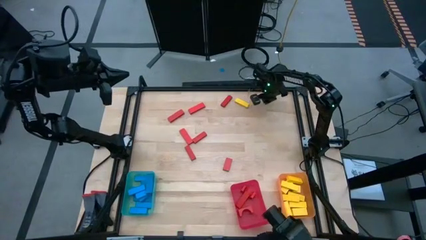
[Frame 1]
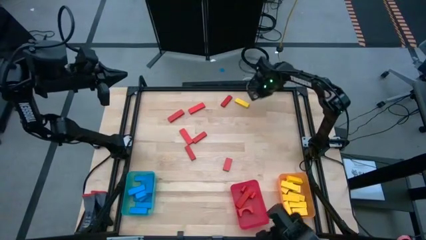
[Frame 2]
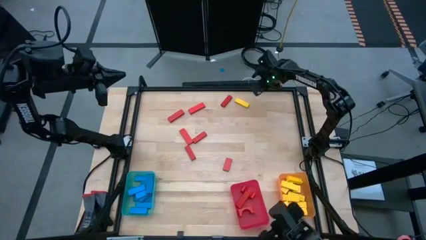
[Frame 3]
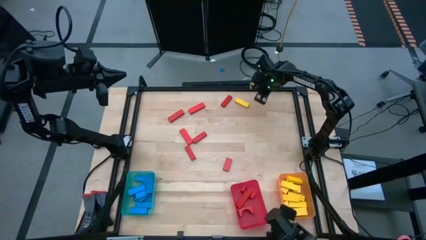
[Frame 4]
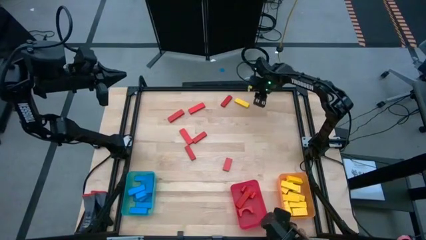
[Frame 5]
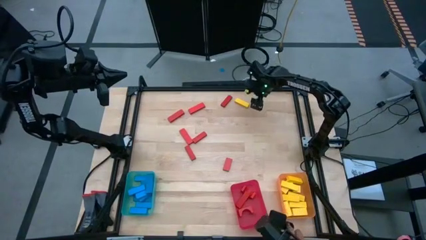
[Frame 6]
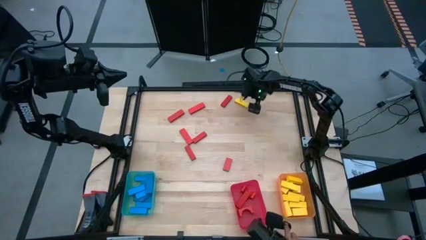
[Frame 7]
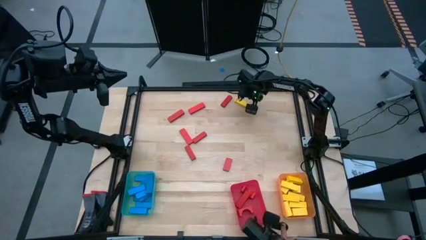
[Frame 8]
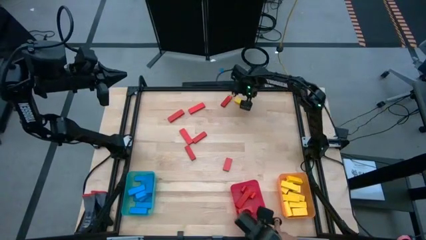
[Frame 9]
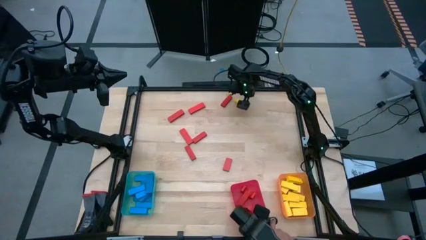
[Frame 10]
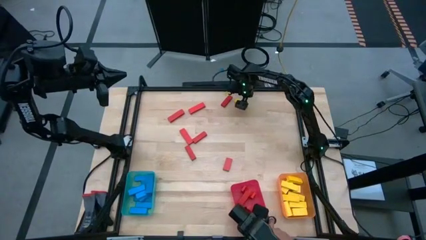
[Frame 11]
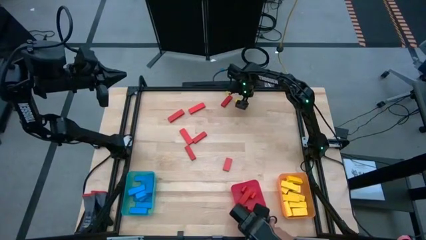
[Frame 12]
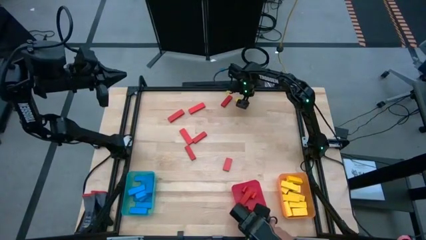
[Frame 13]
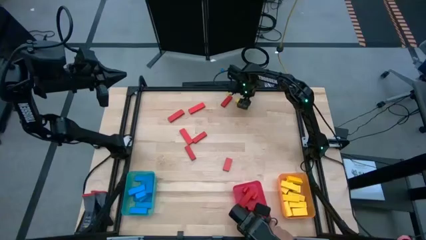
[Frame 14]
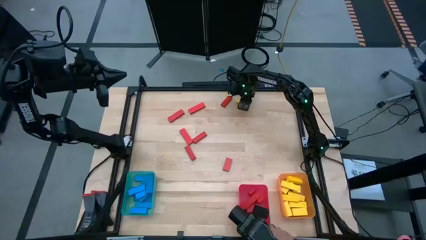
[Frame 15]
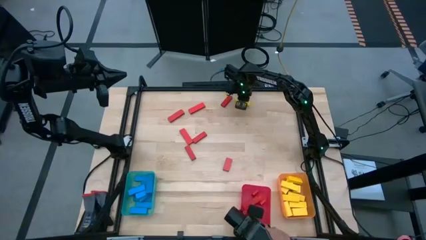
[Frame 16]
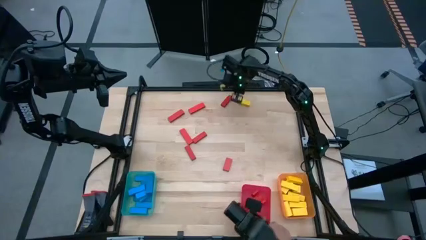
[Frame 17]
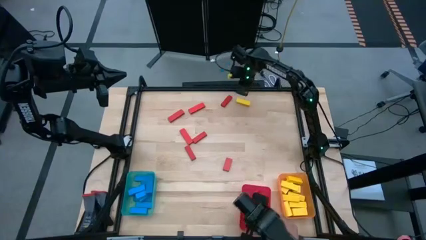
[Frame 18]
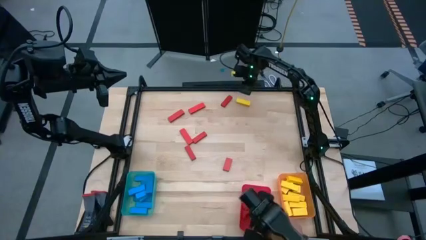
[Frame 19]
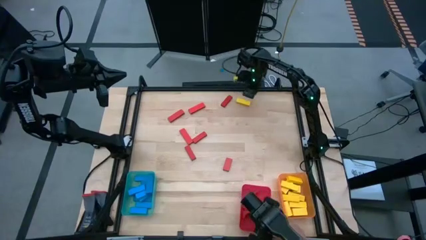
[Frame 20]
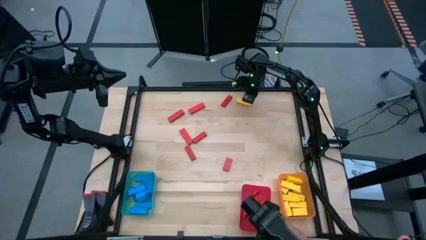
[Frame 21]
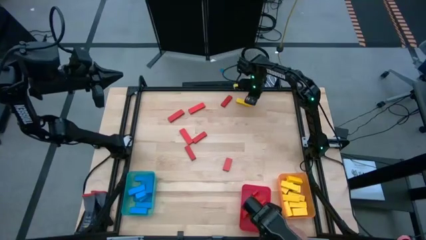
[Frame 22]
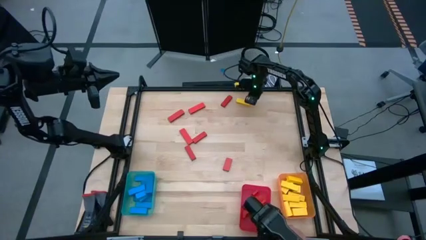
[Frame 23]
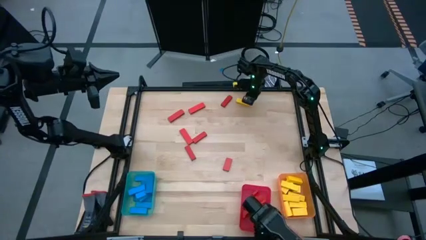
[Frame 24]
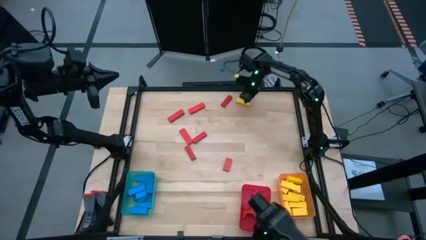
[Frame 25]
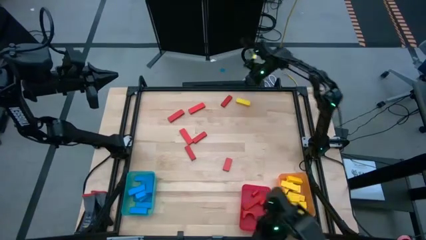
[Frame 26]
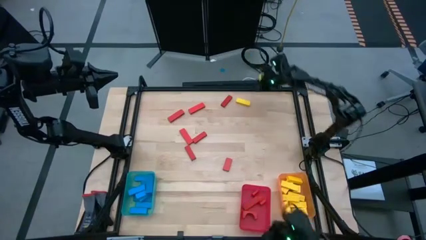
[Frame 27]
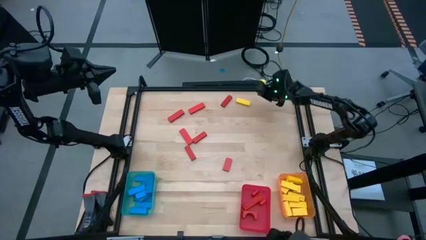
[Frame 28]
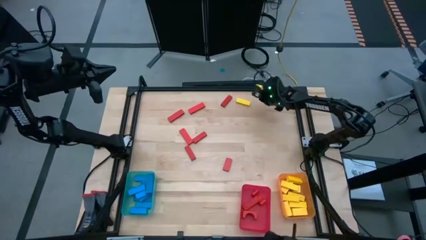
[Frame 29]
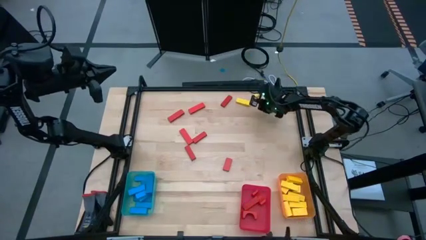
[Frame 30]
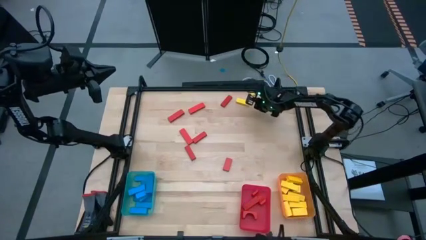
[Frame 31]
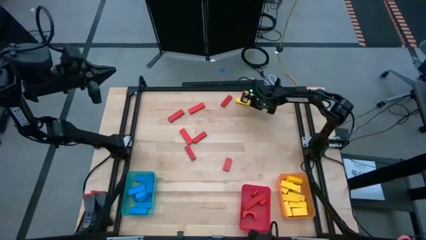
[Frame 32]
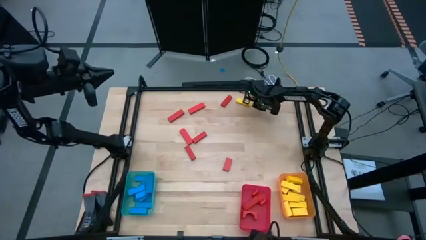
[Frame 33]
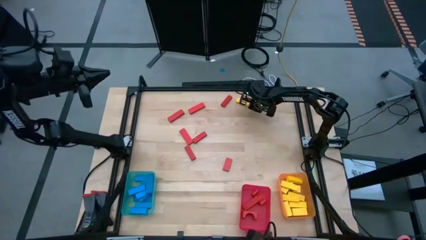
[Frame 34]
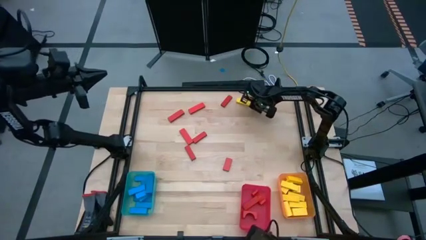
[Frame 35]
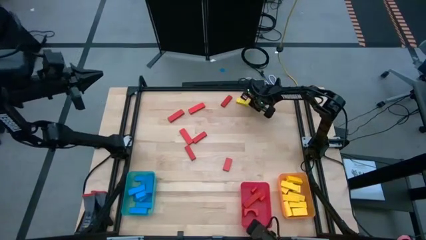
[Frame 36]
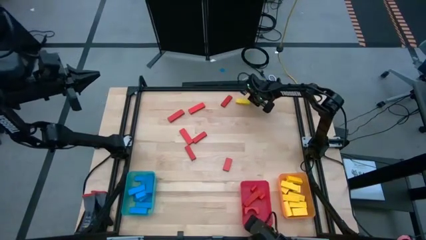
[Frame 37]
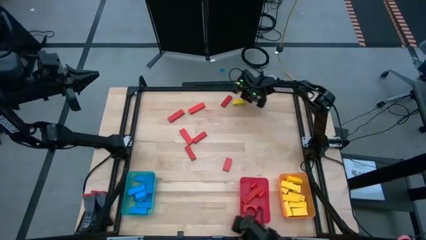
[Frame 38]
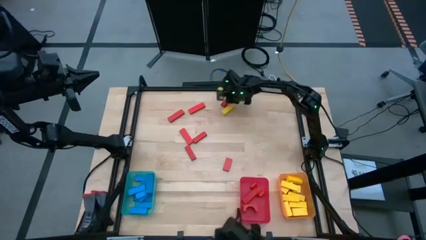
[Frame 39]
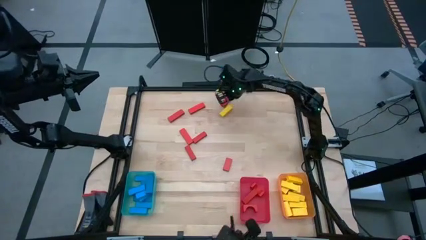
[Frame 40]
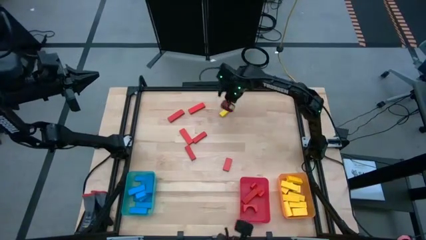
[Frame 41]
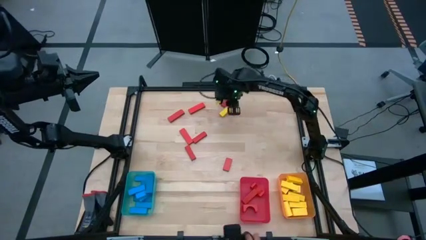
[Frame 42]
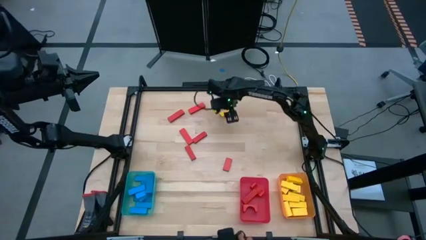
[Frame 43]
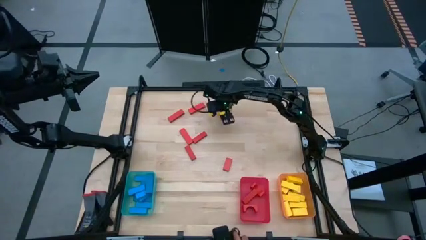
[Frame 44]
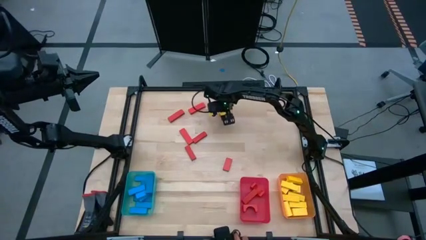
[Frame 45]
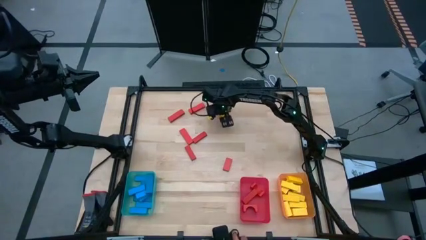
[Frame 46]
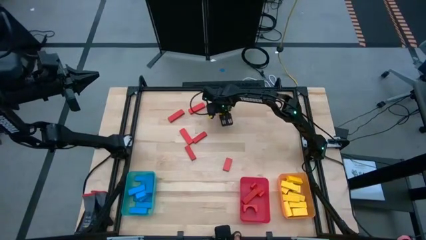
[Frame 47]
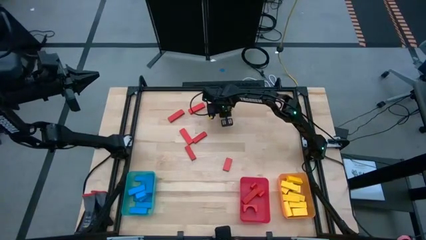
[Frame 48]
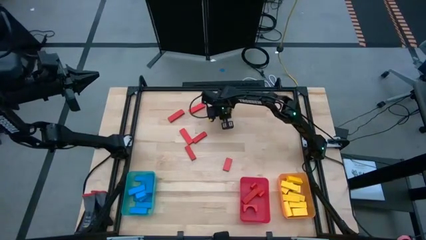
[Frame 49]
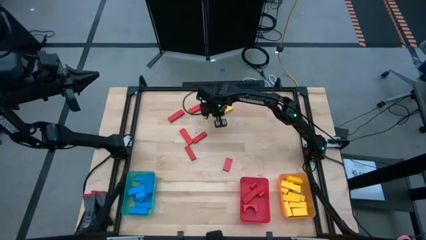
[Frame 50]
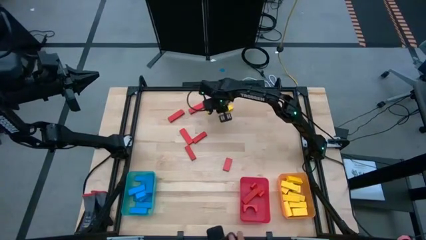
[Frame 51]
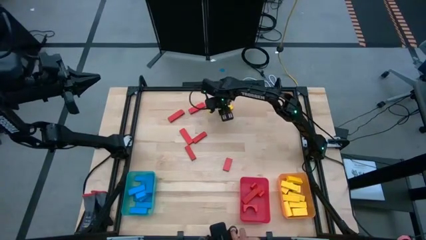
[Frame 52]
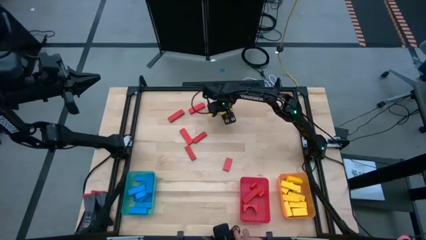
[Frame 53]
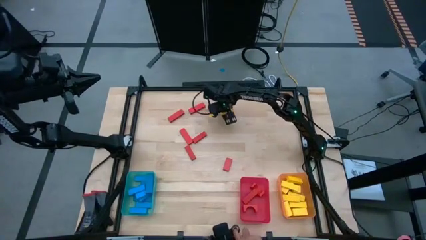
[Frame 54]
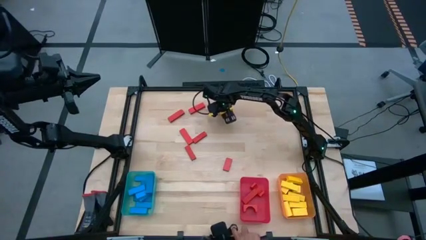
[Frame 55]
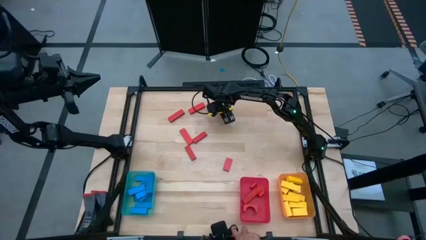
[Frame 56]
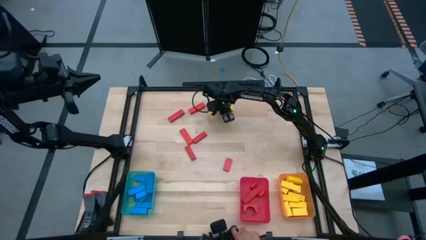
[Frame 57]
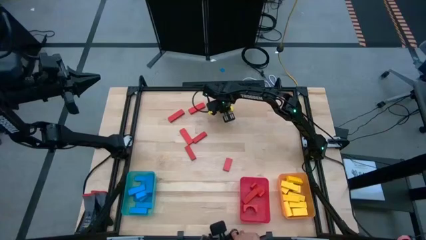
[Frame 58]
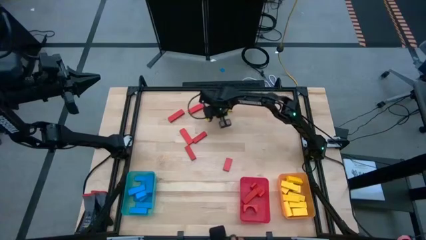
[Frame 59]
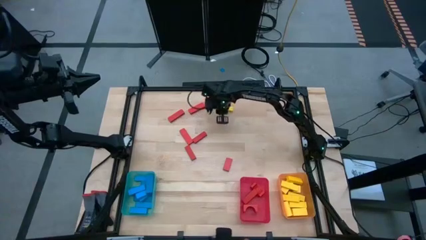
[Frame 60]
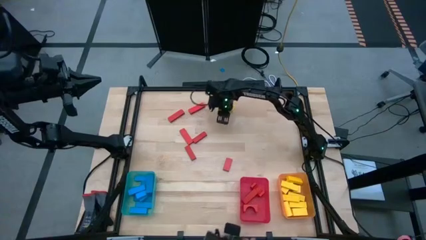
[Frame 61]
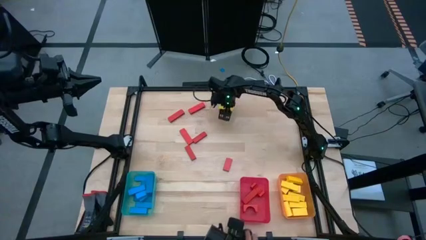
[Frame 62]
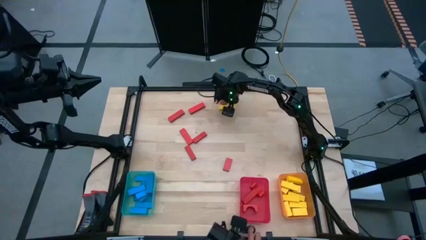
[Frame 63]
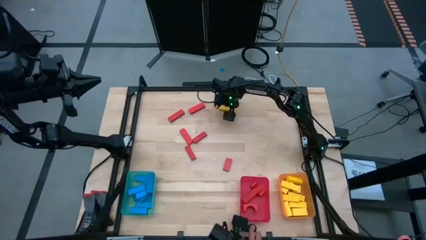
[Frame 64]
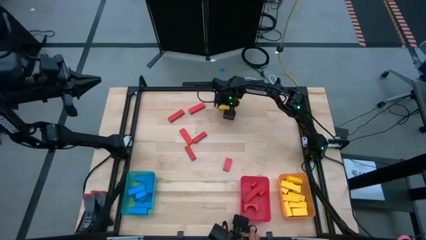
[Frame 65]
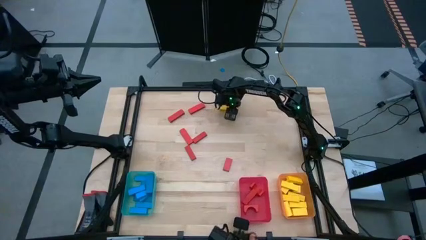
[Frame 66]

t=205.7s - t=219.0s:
Task: Sort blocks
Put the yellow block into the orange bin

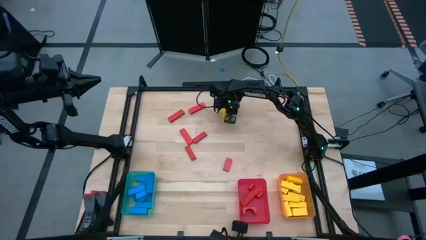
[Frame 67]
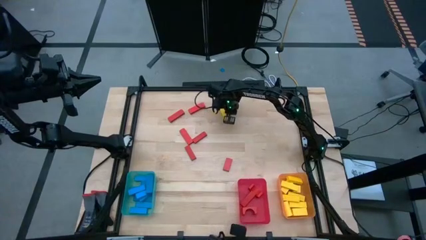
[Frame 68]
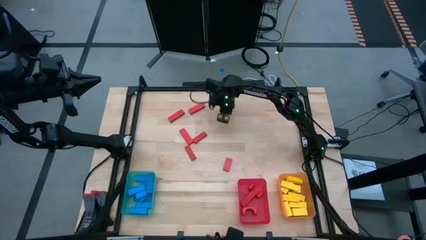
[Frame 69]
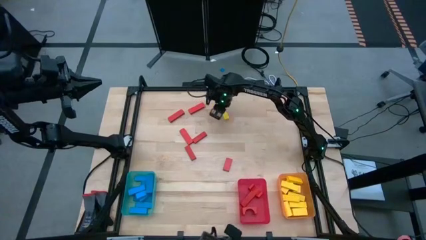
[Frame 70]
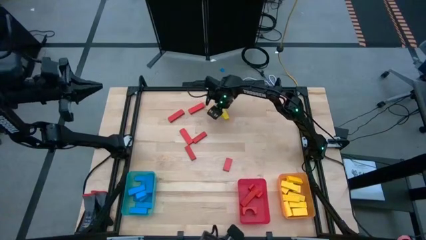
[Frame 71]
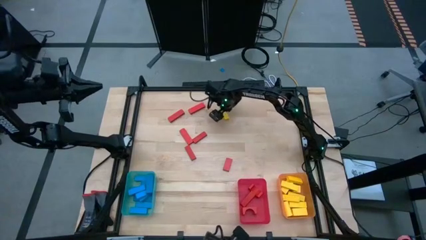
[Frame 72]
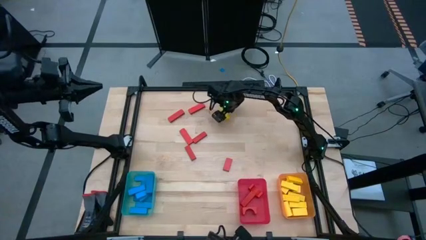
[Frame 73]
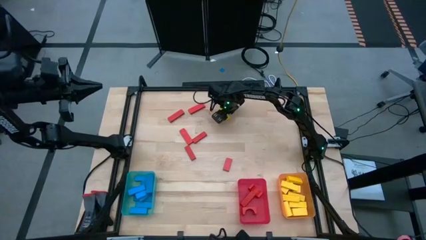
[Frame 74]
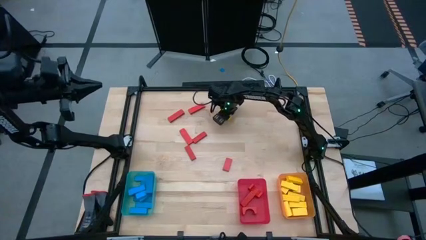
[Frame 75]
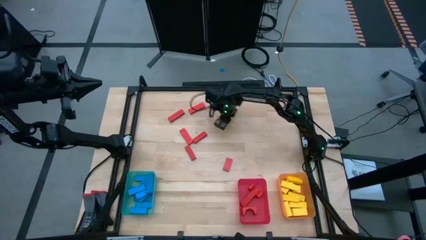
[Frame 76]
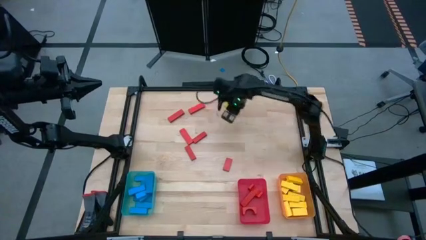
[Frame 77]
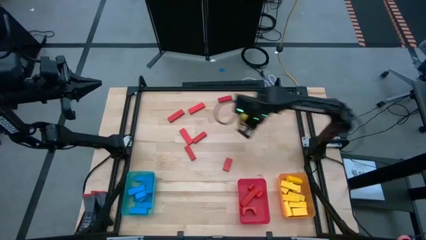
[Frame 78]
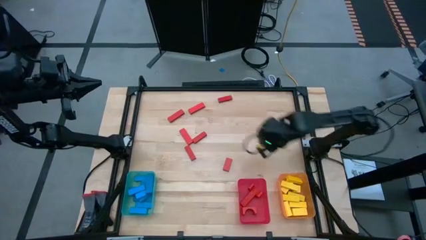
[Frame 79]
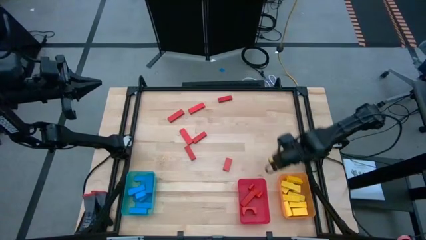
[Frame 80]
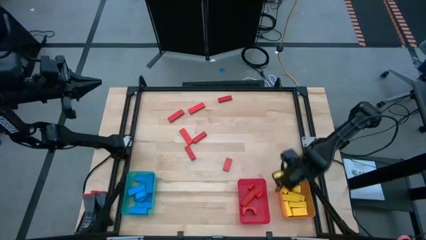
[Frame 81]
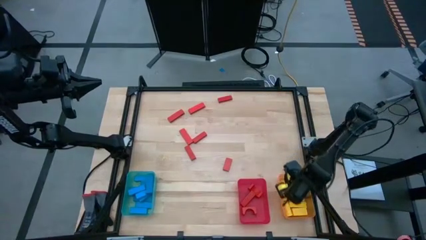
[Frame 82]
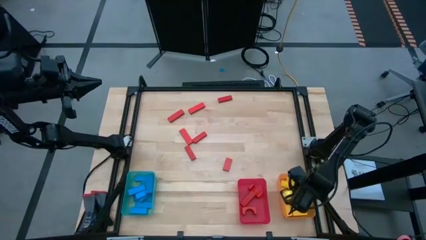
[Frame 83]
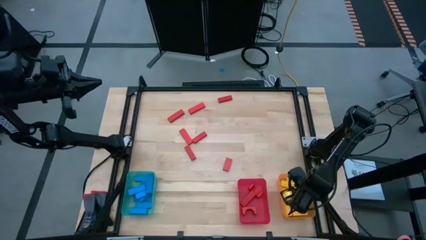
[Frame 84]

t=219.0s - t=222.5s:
Put the yellow block into the orange bin
